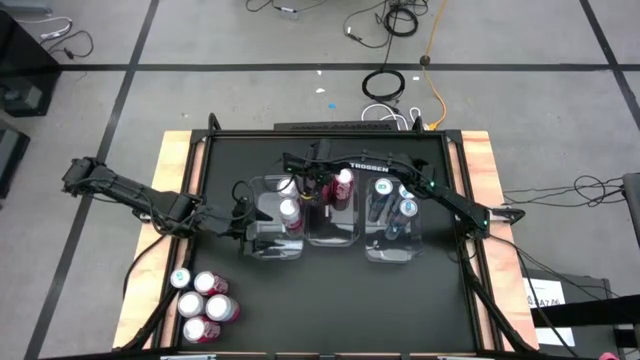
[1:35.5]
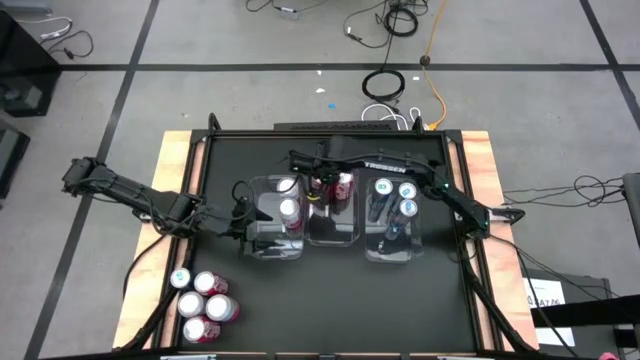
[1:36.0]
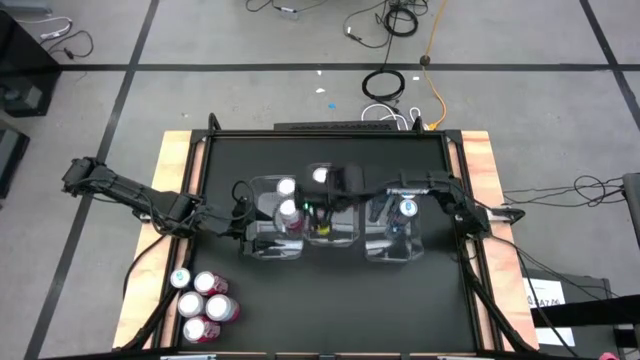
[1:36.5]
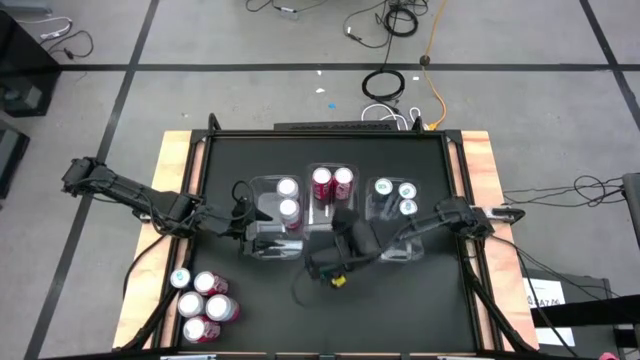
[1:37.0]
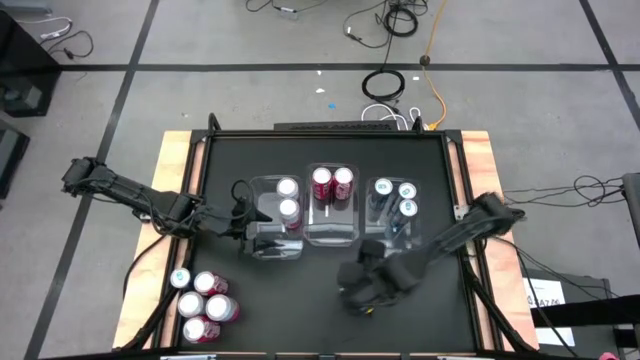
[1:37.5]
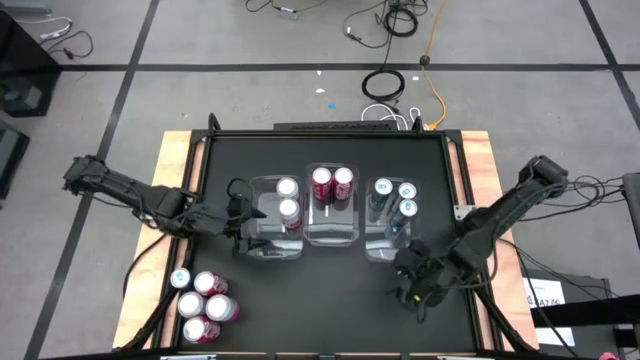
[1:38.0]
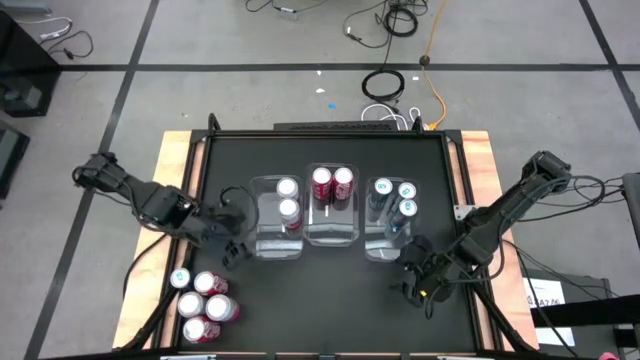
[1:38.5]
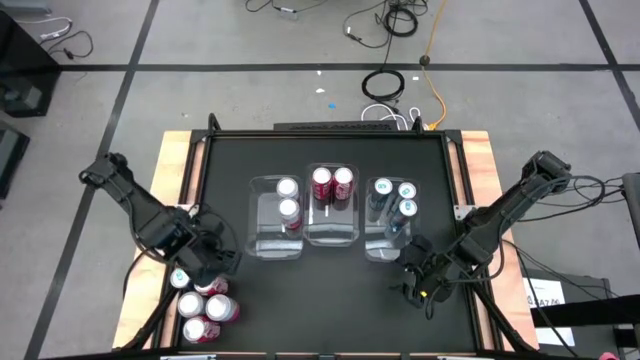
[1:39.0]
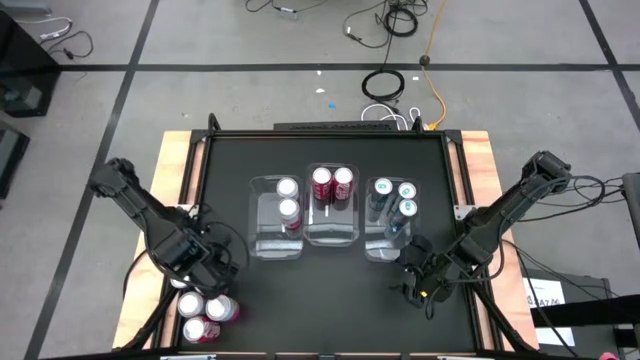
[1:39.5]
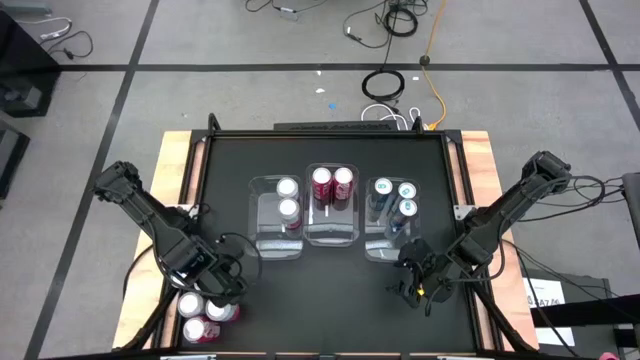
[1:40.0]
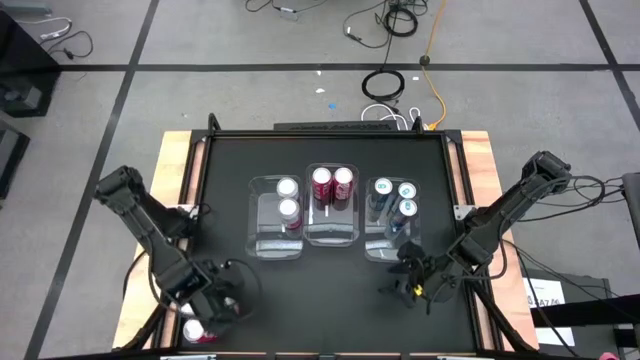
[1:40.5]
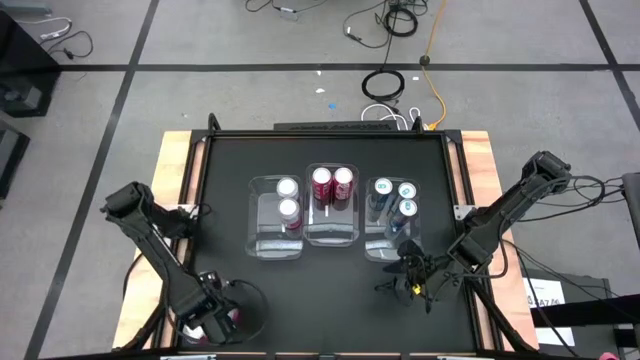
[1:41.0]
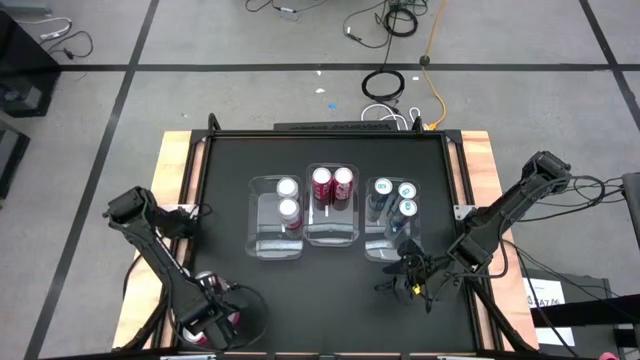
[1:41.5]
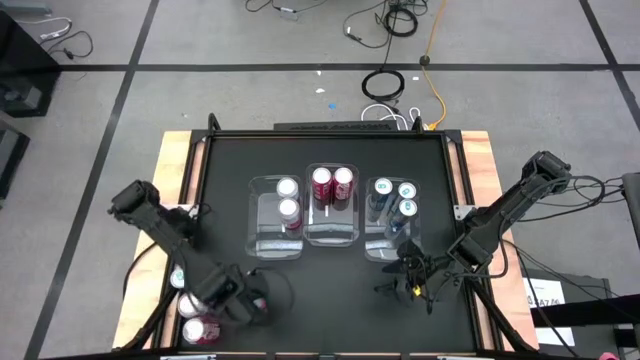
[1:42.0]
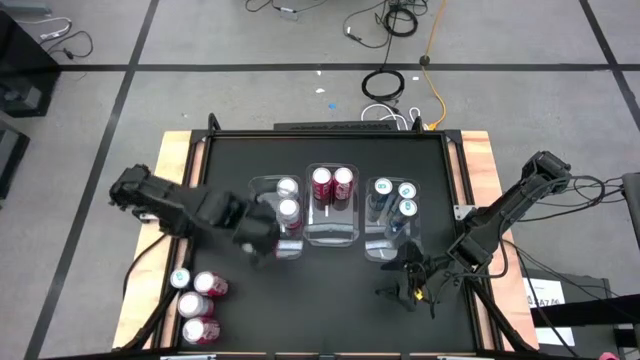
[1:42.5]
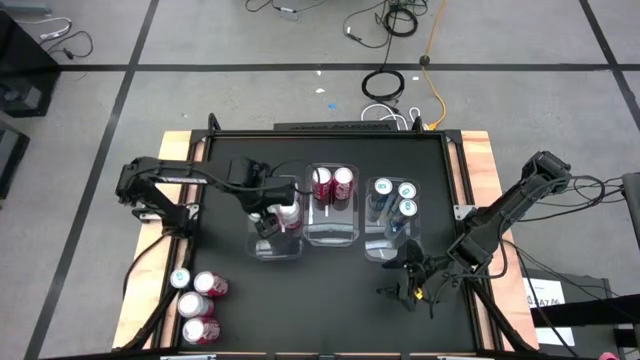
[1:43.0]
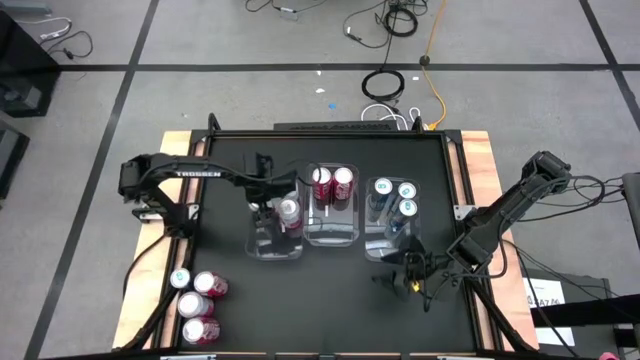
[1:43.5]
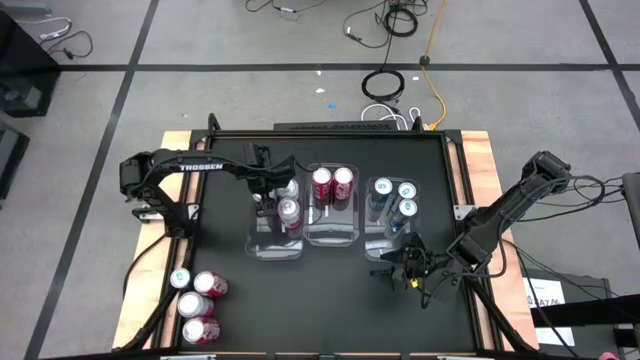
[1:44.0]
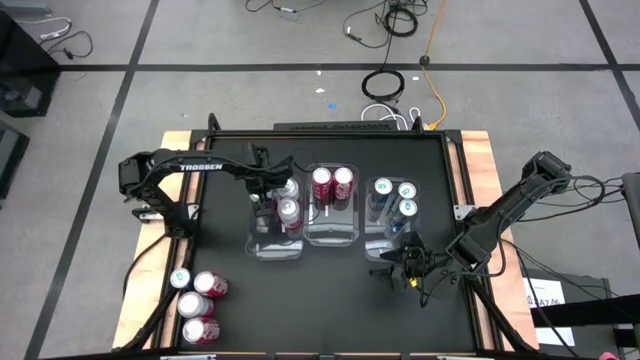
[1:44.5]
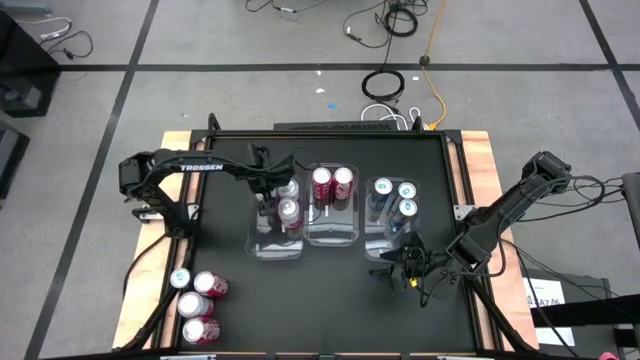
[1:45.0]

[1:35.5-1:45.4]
Task: Sort soda cans
Put the right white orange soda can into the middle left transparent bin

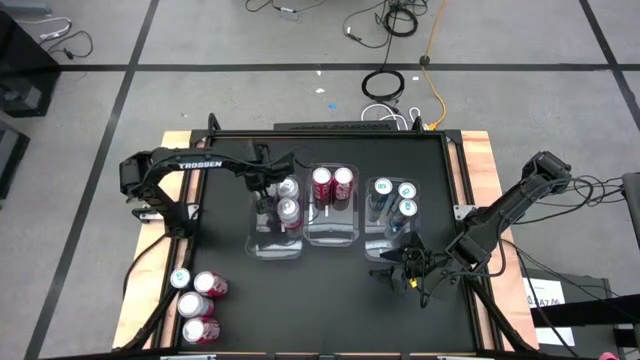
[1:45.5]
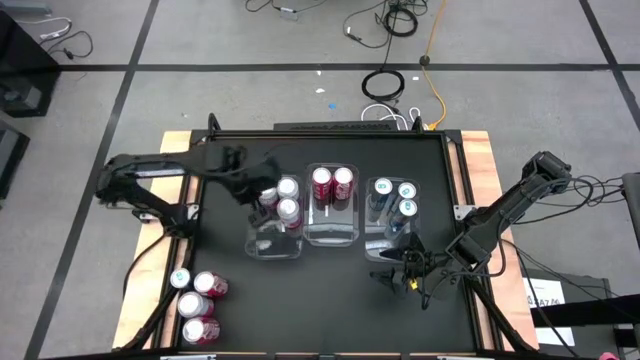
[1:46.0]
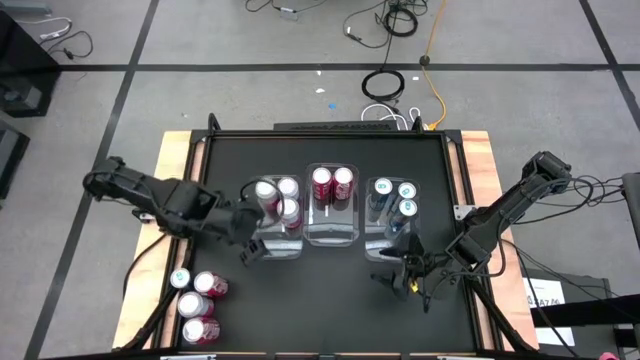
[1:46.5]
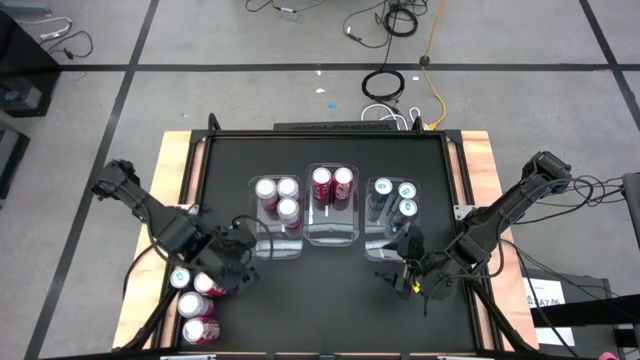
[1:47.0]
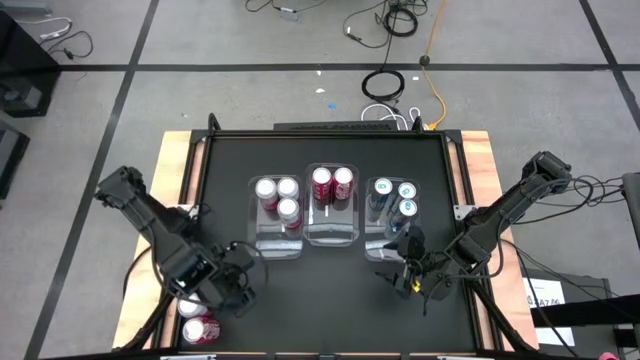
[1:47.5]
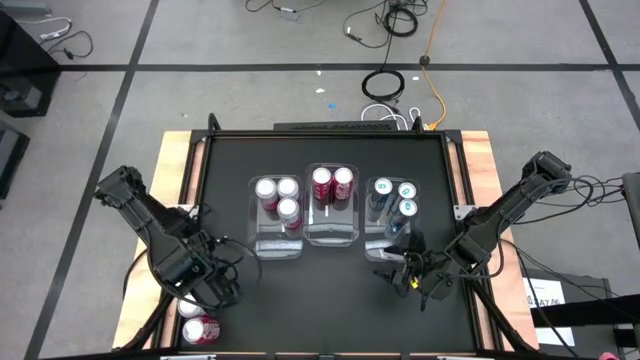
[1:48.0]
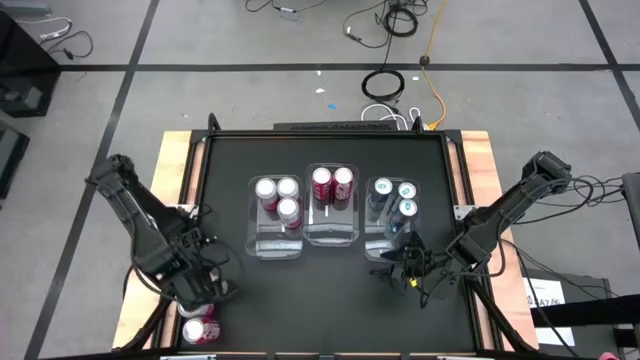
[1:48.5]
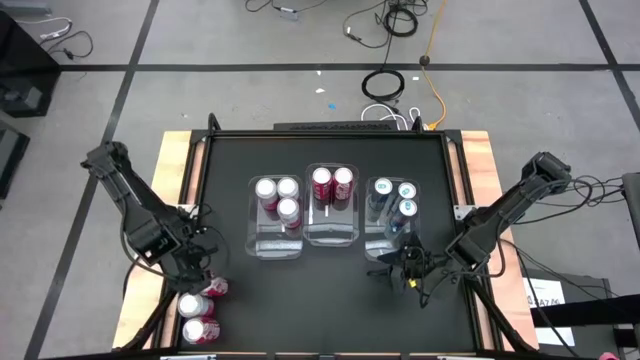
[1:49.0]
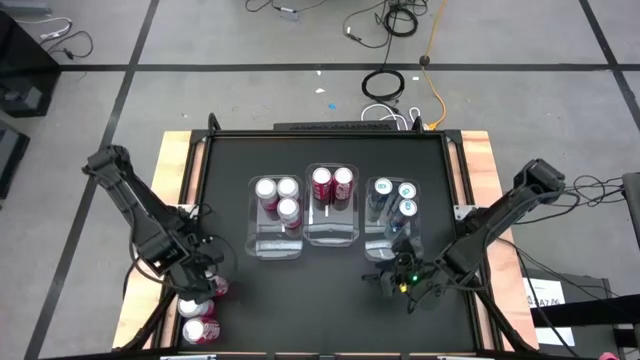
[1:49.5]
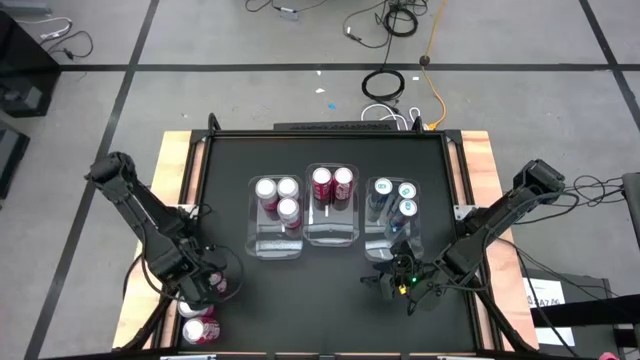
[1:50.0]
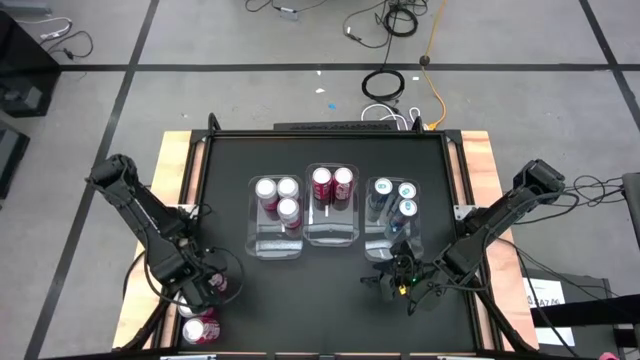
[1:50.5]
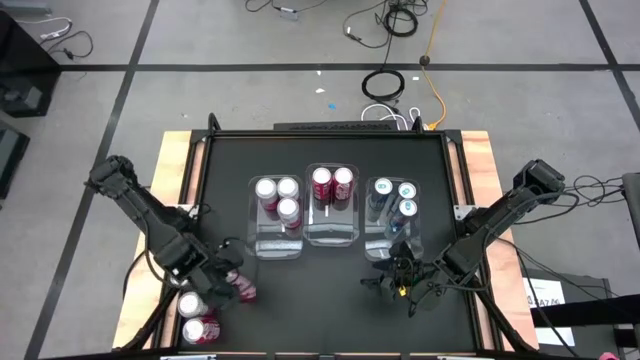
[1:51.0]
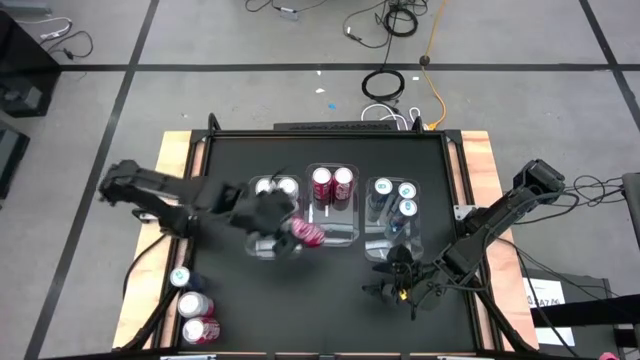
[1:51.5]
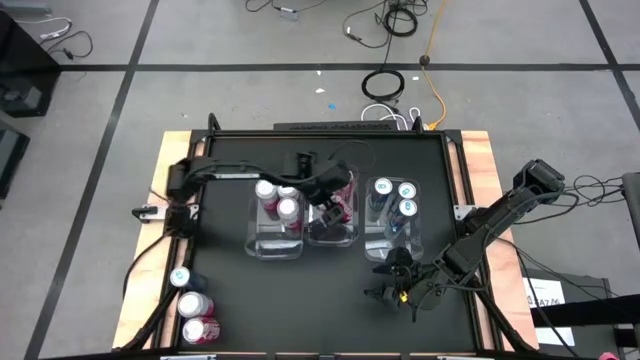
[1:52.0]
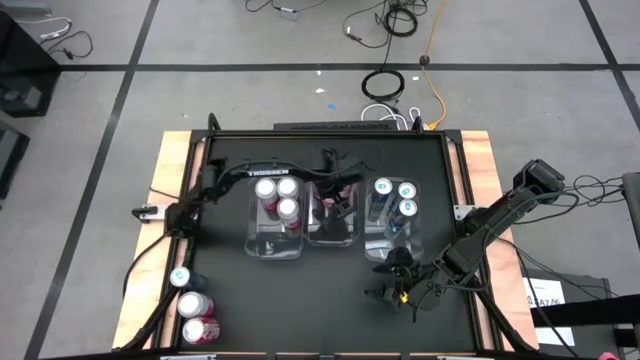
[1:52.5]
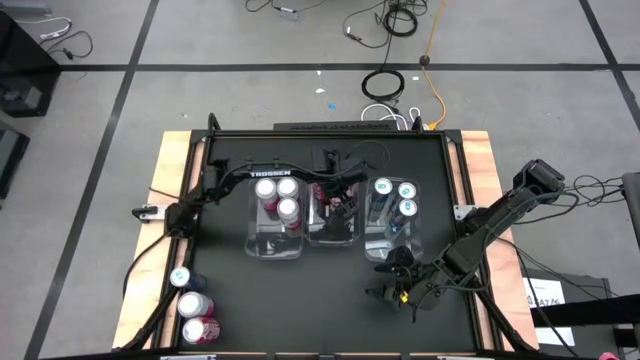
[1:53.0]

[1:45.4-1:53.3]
Put the top red soda can into the center transparent bin
